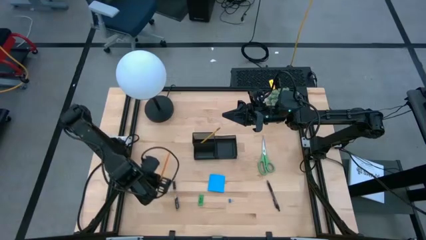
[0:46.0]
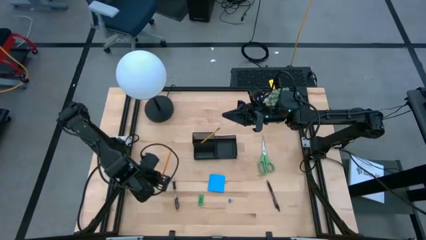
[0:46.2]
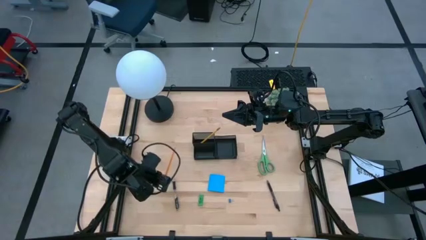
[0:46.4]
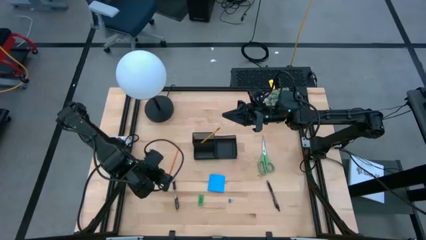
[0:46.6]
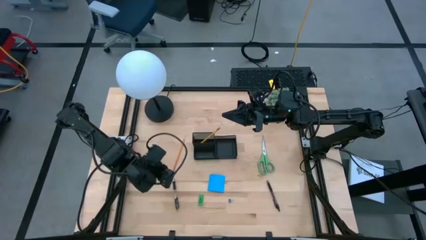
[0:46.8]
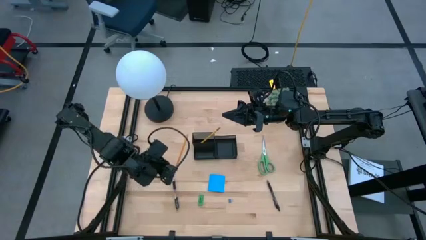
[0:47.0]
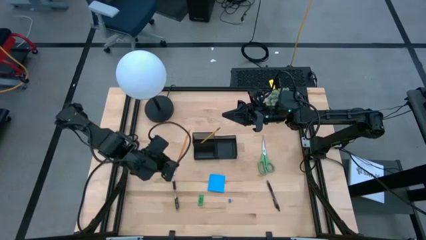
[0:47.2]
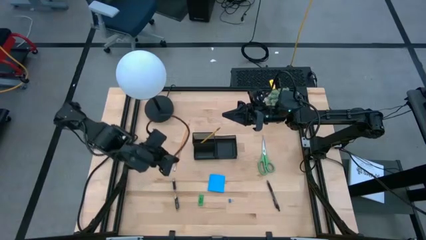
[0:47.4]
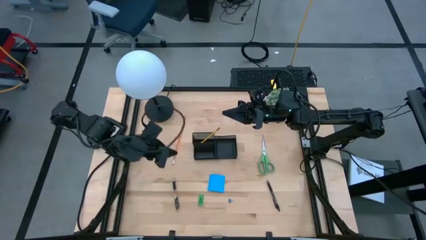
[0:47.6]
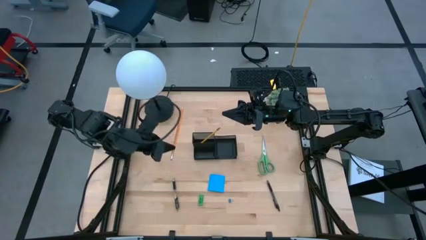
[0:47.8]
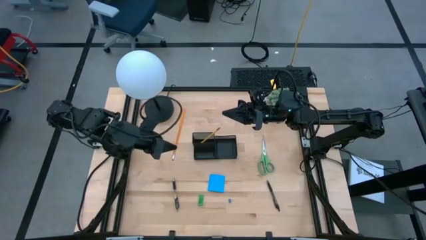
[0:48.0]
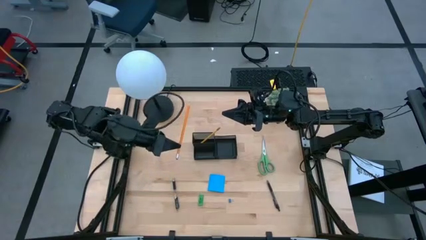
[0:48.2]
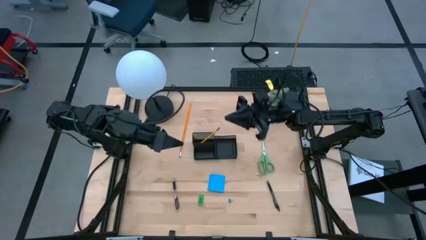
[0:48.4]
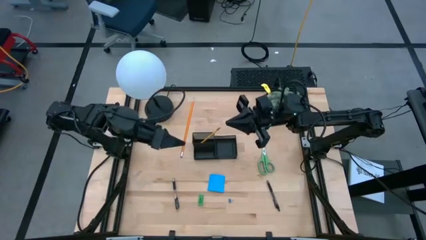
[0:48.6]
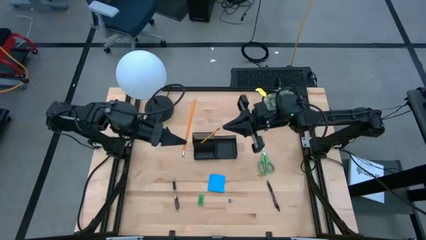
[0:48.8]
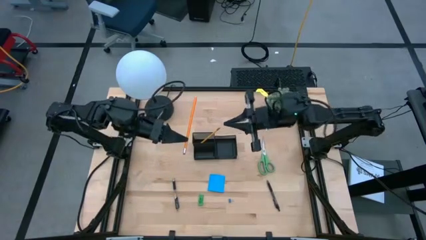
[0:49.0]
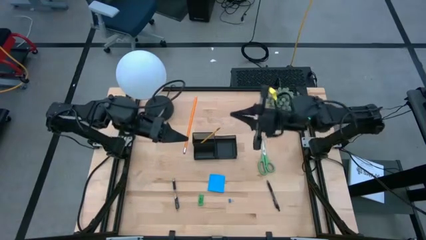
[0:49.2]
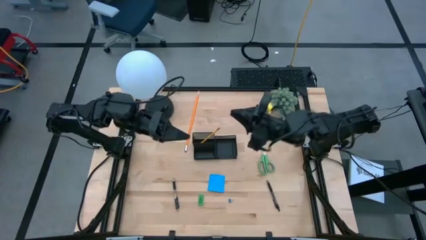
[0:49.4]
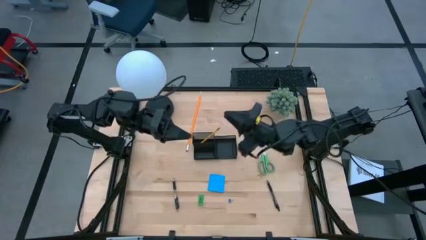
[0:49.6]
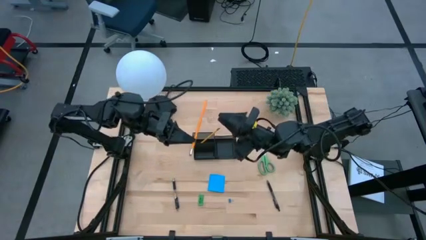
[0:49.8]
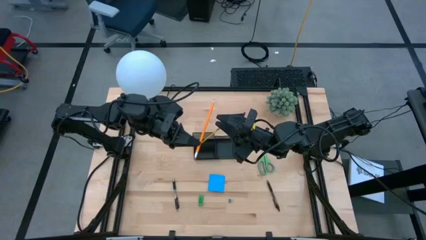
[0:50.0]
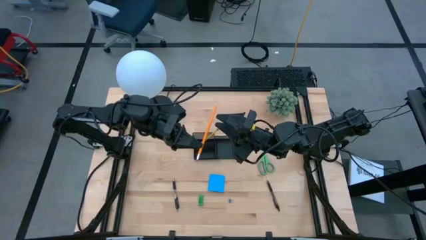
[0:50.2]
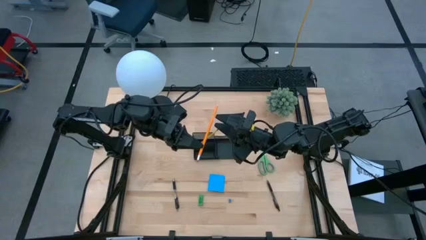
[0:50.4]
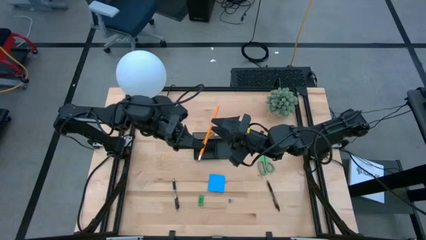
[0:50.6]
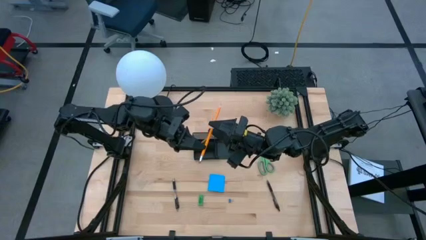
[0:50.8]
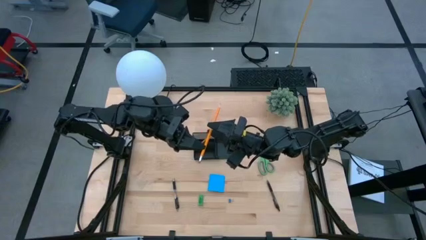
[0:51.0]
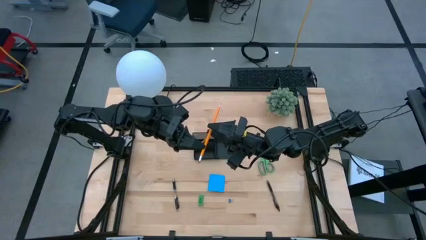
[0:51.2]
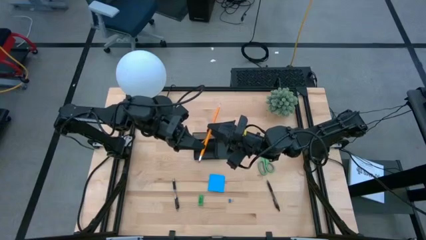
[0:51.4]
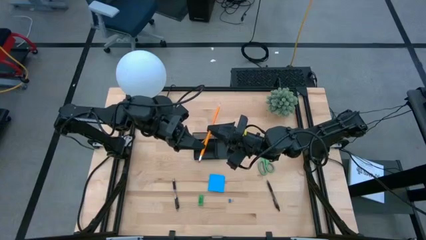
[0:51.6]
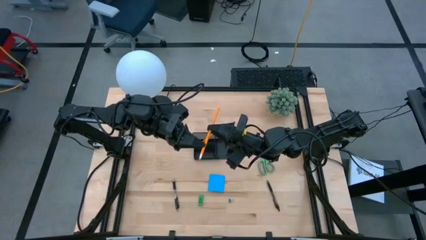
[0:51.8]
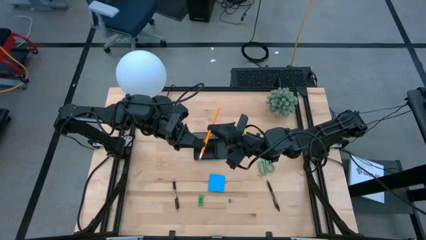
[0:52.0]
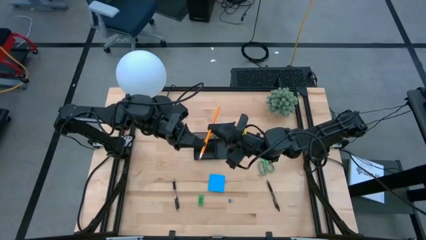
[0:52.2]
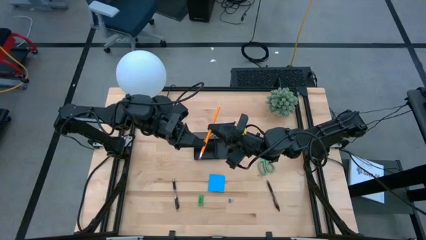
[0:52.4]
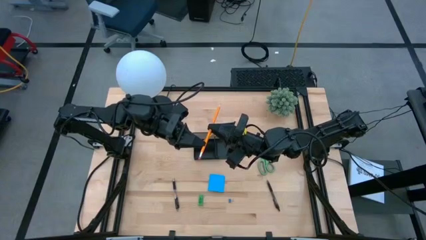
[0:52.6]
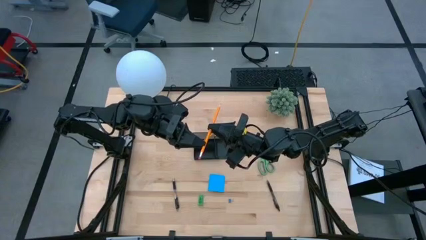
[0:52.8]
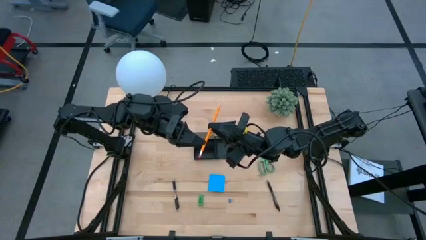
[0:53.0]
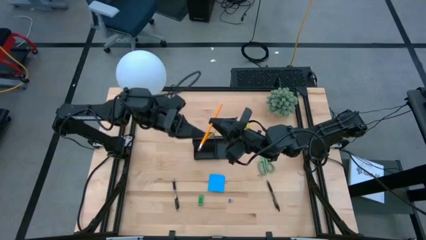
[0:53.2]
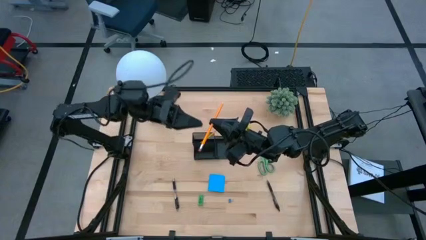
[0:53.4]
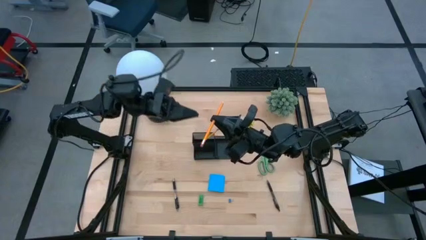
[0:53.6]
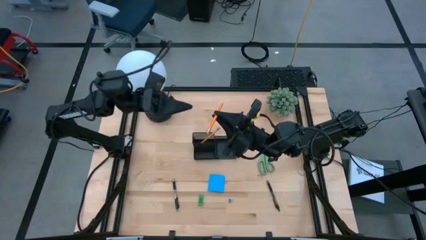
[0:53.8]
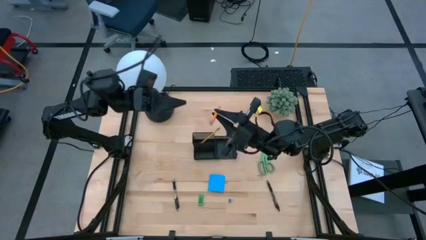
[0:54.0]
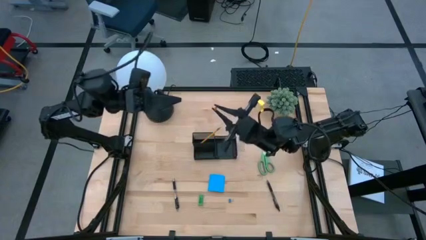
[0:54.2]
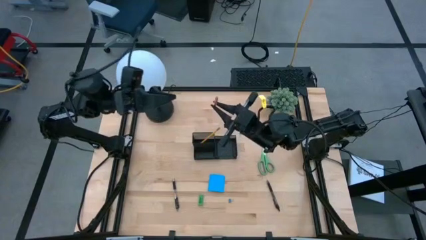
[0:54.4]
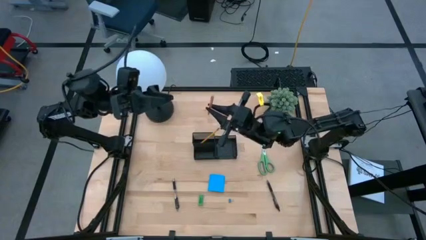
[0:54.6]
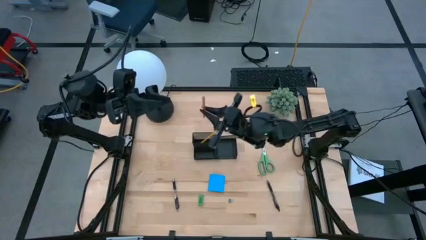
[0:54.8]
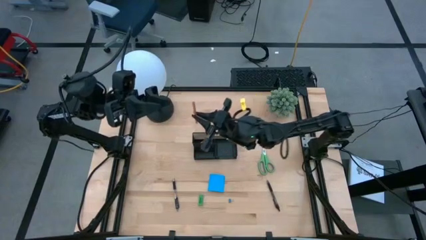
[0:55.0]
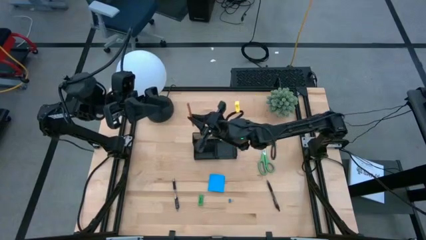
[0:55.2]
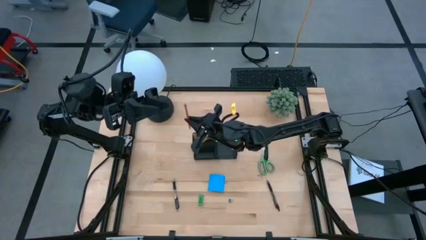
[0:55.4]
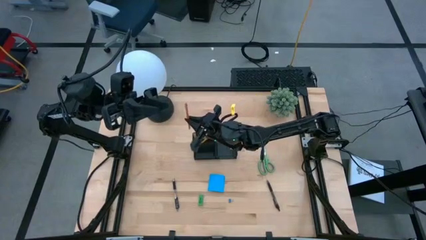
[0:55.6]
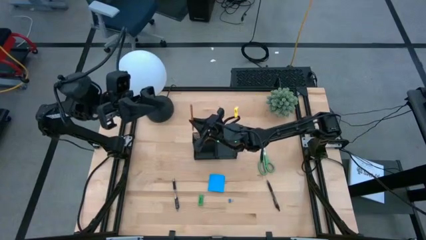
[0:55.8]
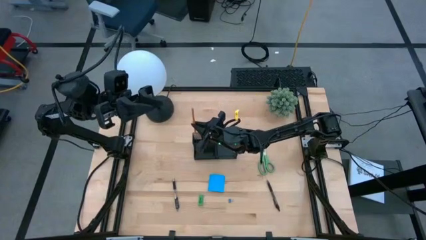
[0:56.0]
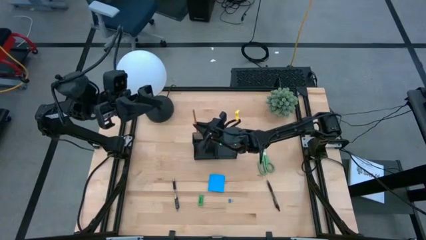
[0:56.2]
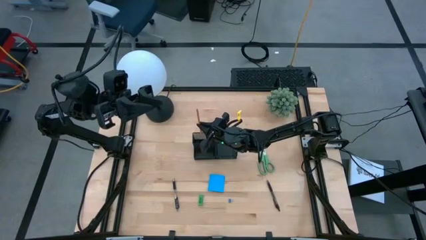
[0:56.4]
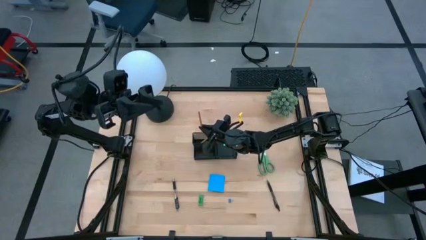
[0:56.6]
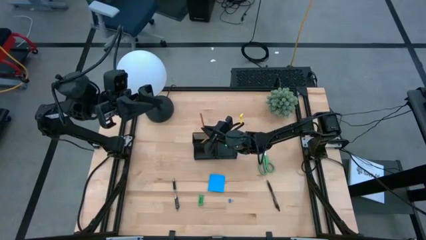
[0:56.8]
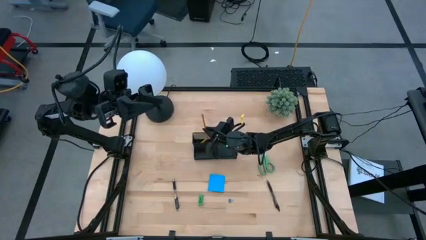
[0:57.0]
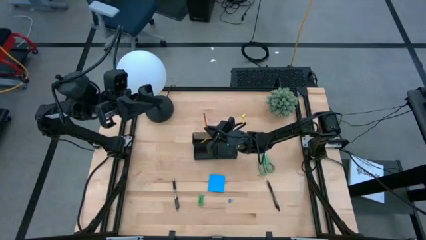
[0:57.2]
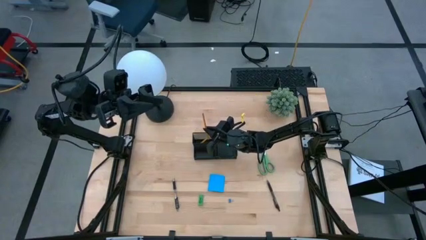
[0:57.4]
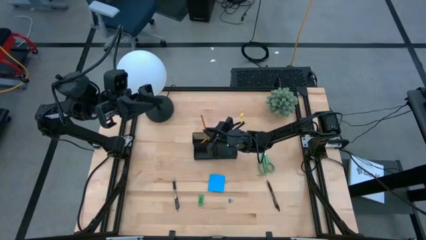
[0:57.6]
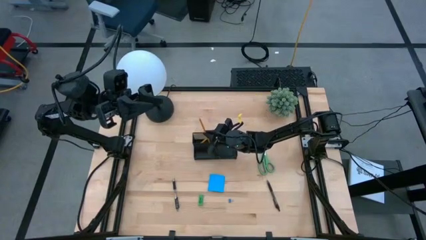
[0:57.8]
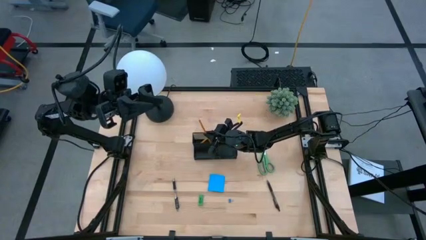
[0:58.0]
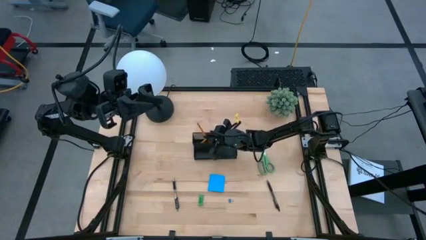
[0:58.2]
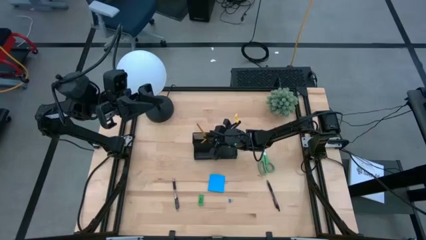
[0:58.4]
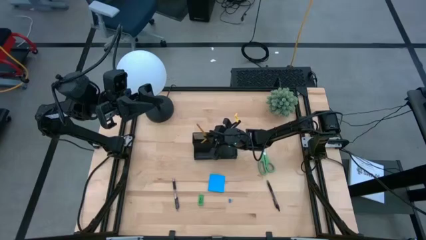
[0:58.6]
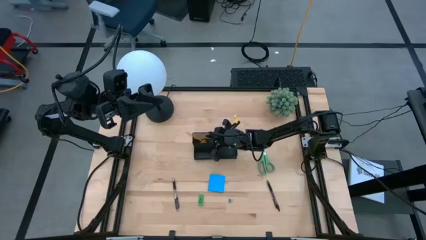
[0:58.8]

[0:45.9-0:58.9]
Task: Pick and place office supplies into organizer
Put the orange pencil into the black desk organizer
